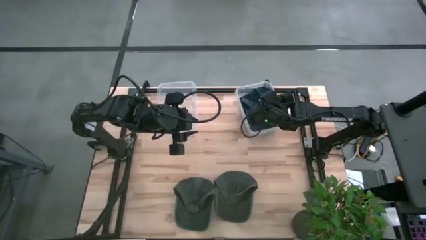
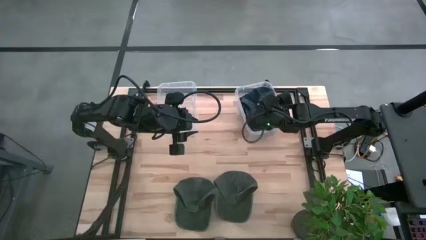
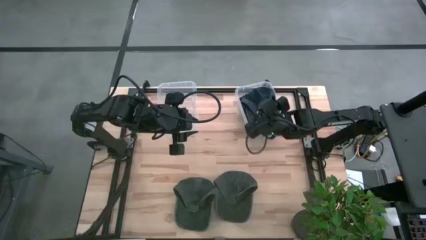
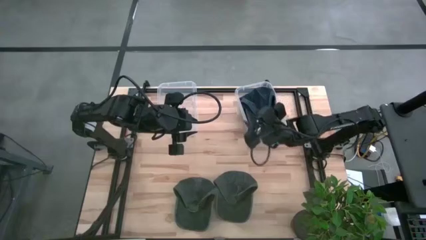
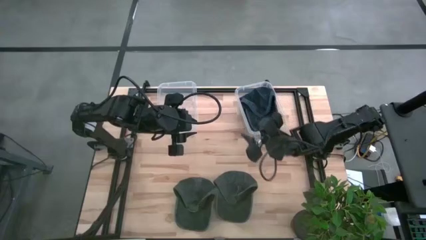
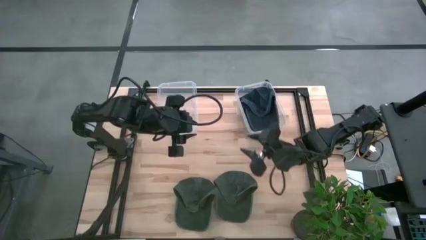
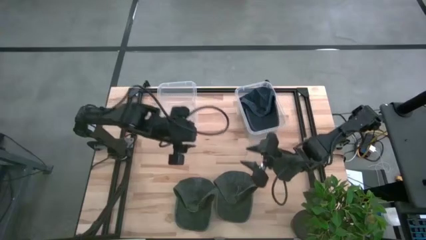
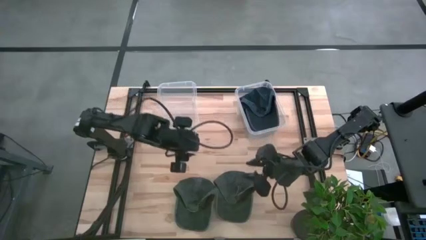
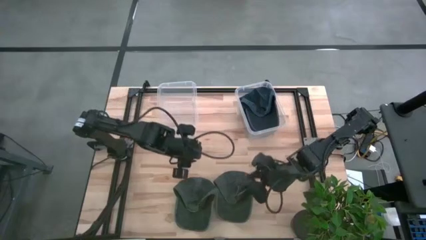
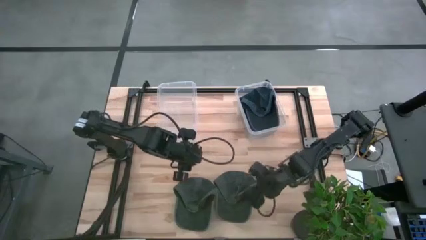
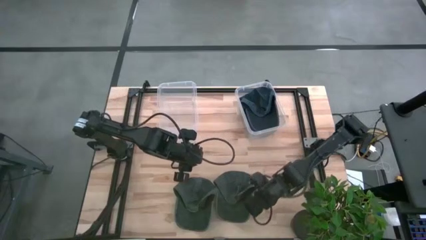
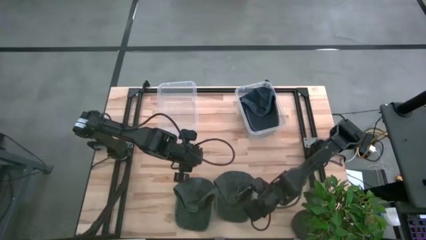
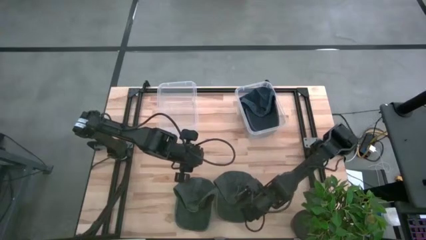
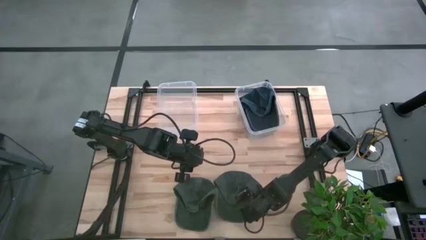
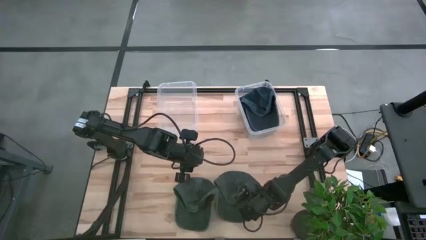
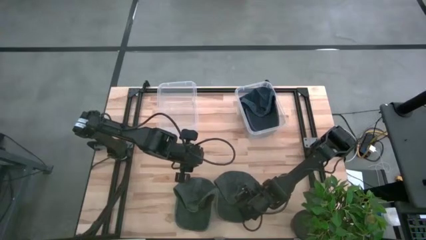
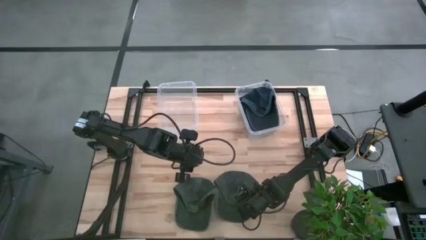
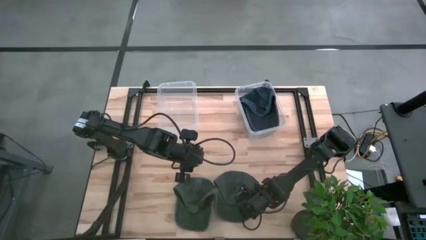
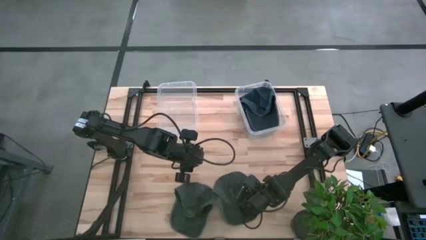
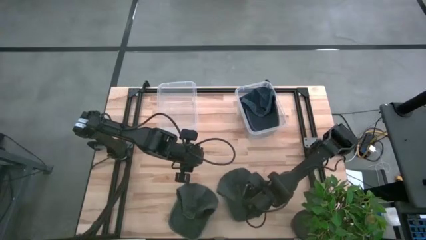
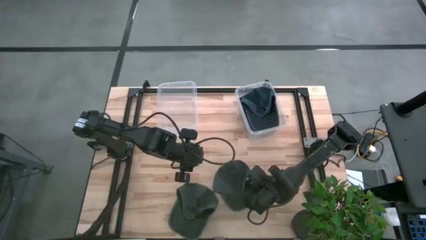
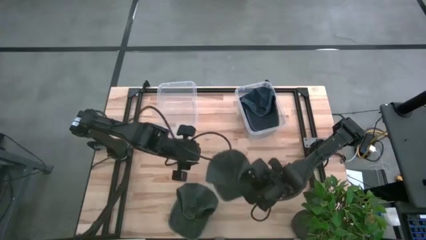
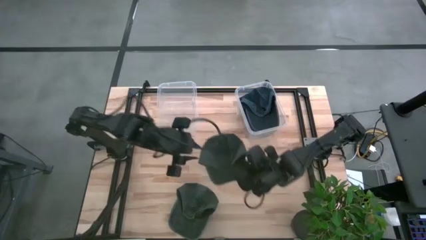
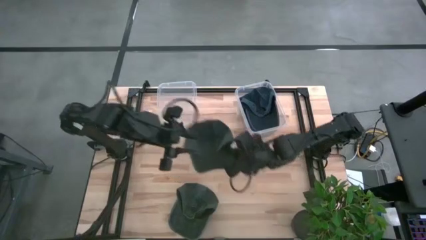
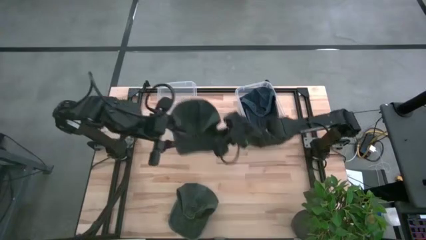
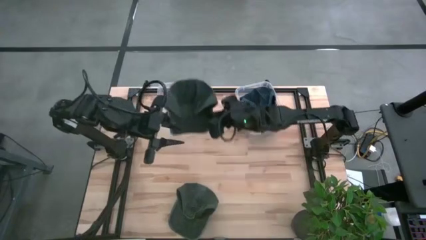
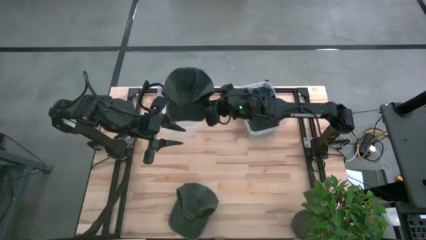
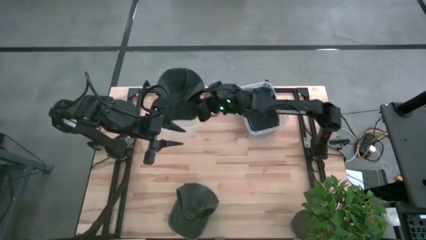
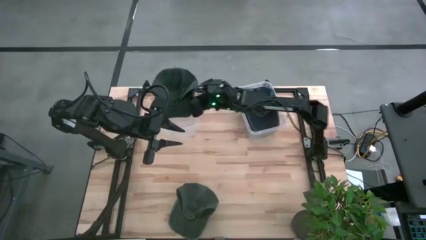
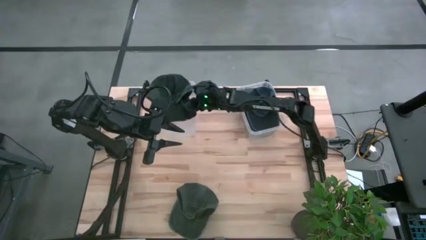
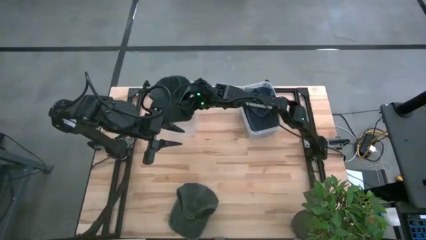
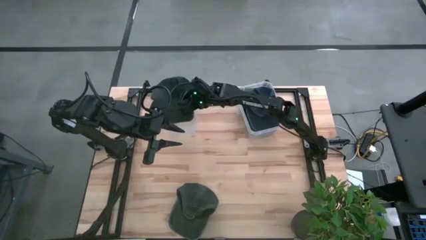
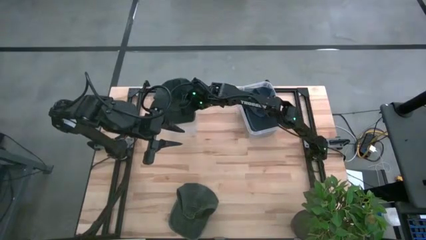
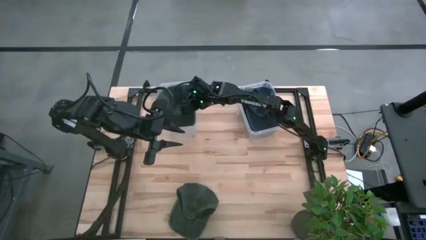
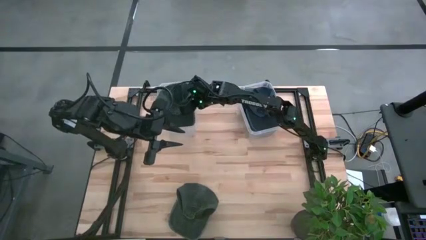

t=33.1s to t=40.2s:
Task: Pick & Place hat
Put the right green cap into the left transparent bin

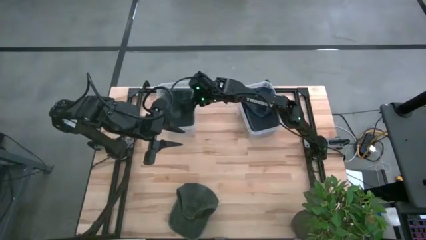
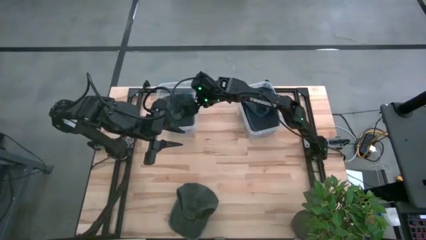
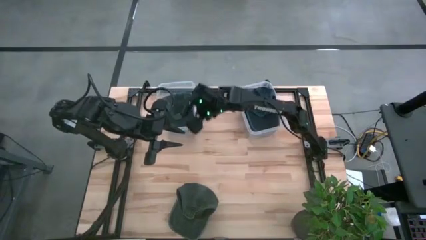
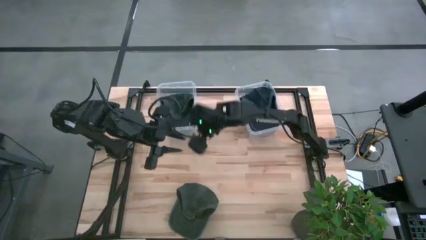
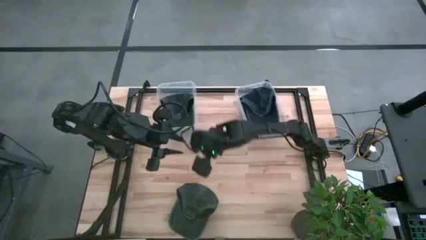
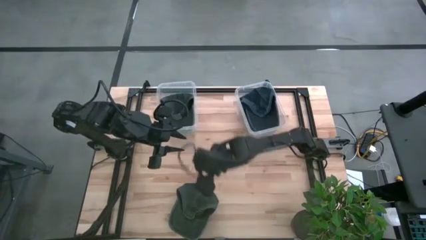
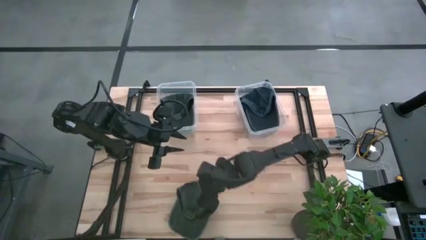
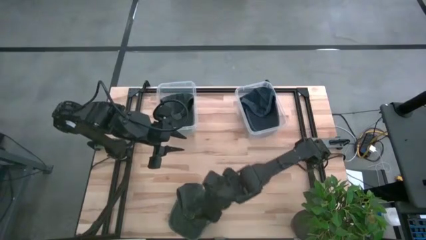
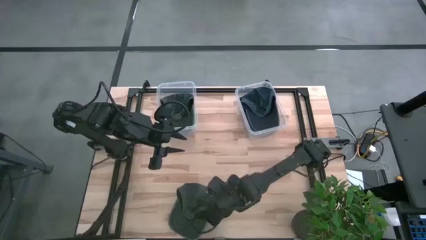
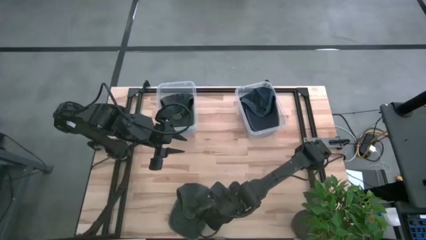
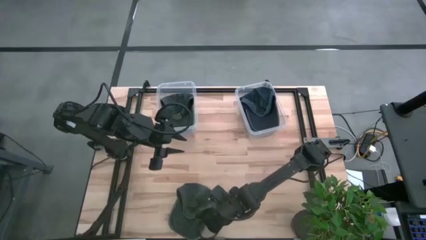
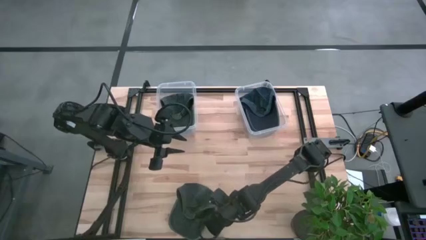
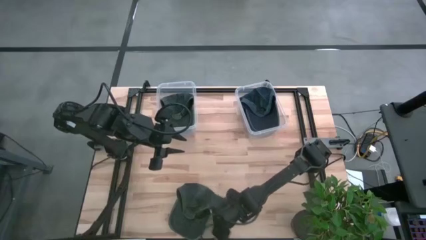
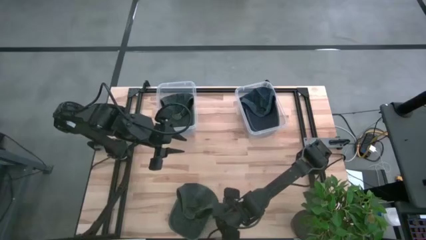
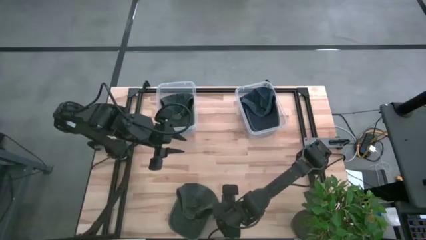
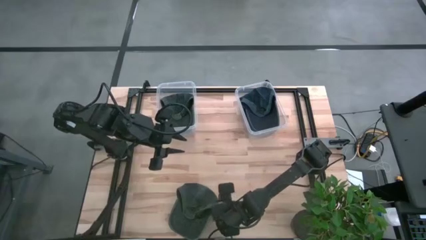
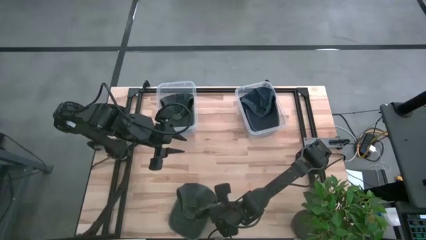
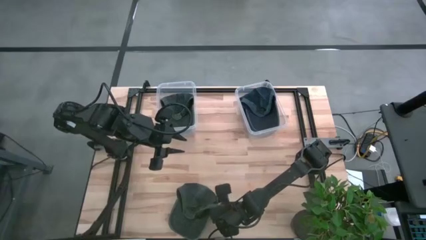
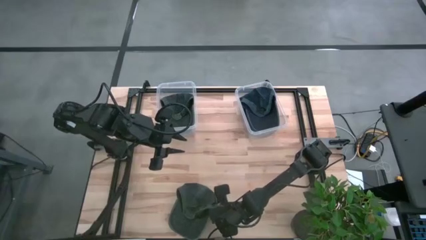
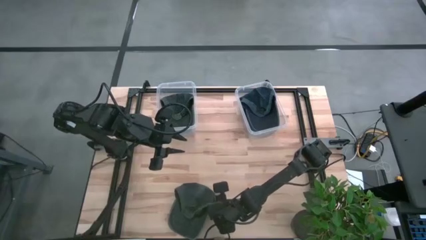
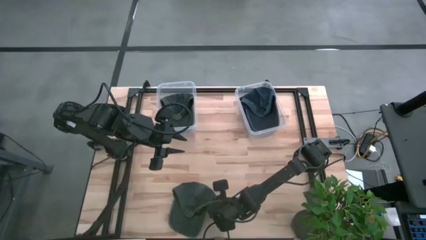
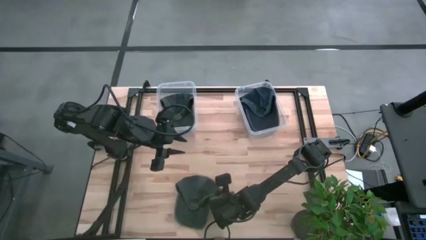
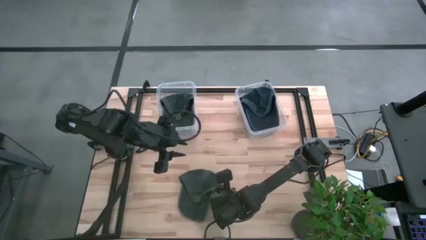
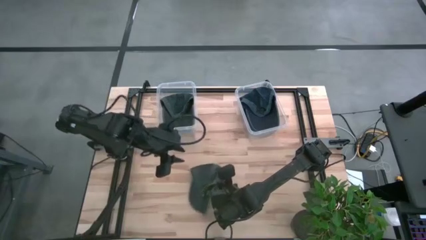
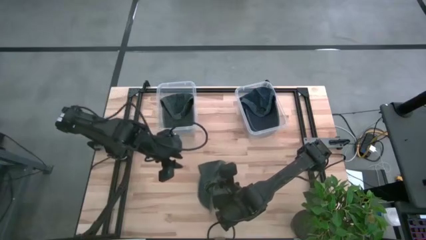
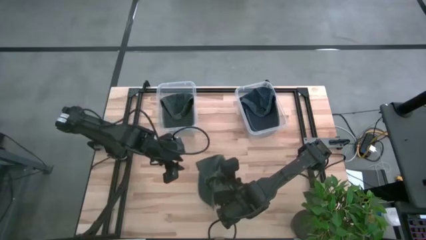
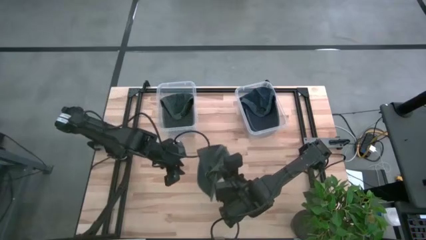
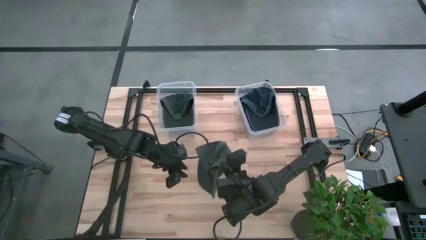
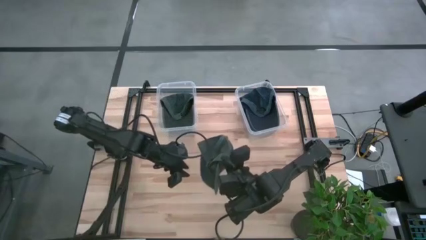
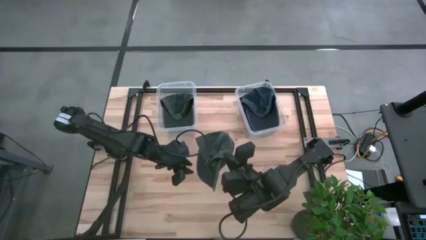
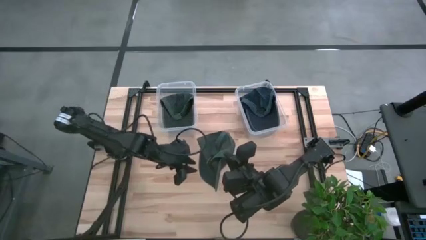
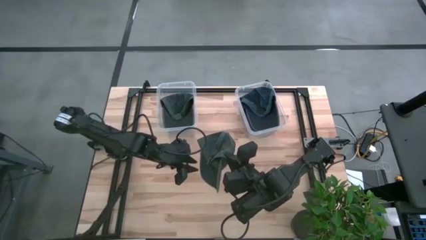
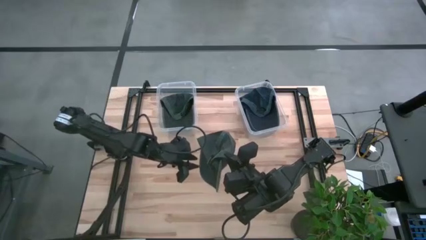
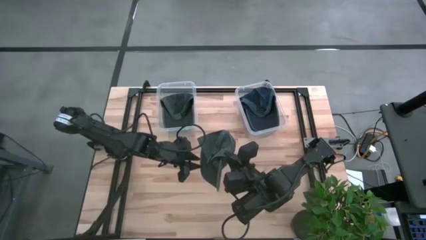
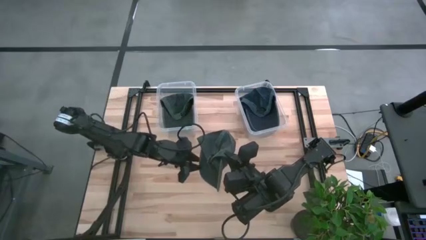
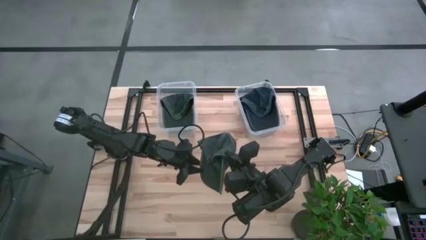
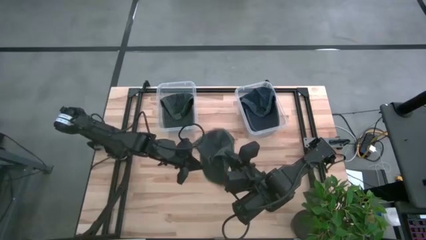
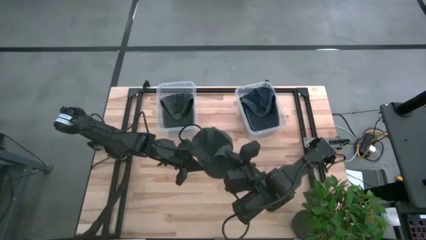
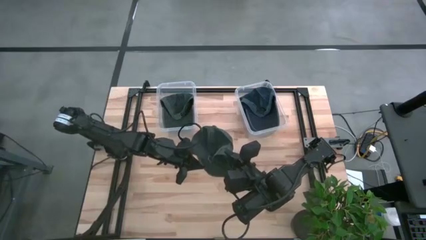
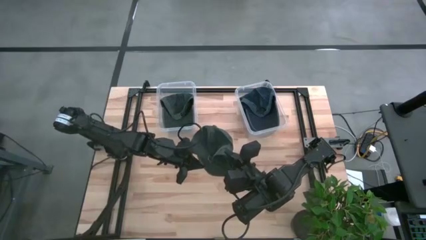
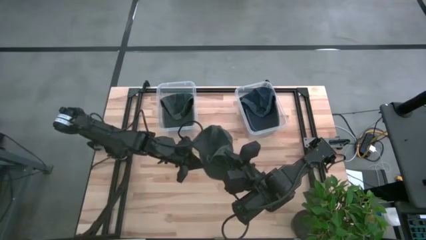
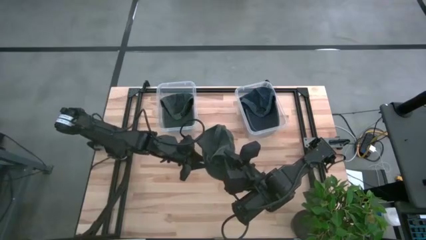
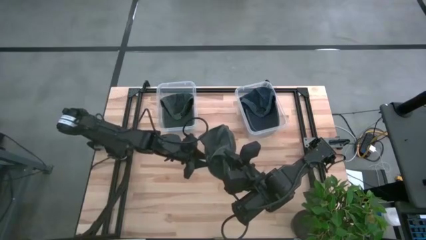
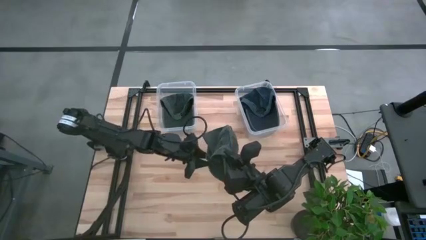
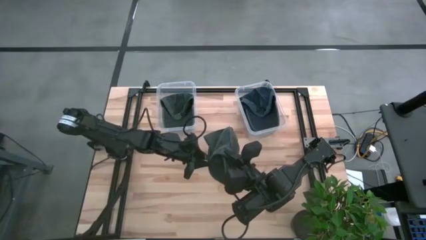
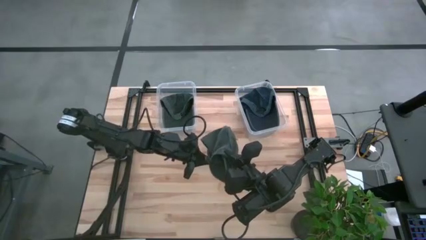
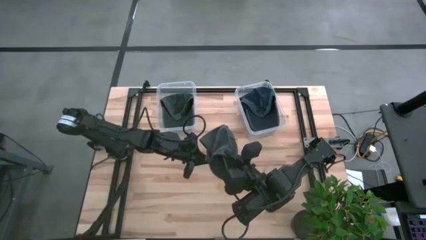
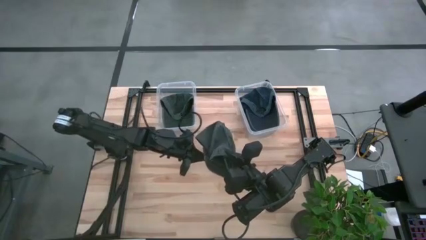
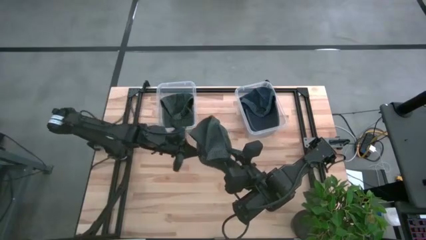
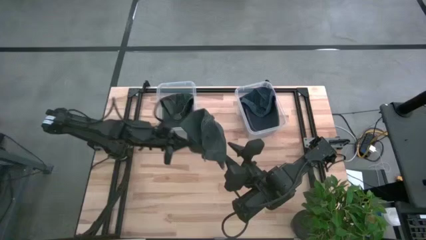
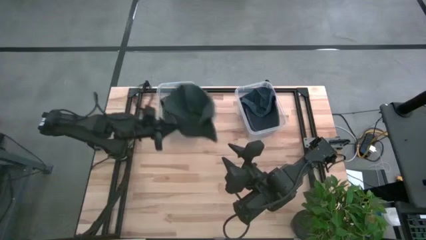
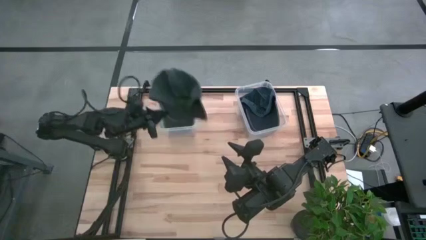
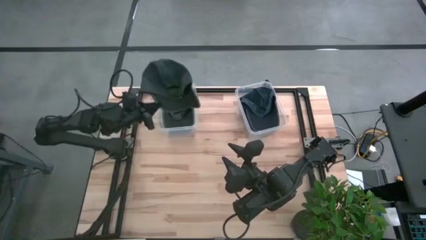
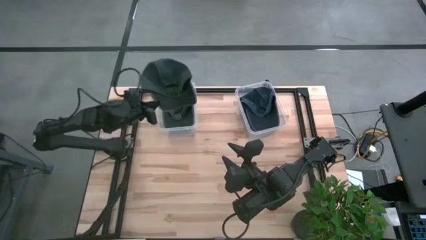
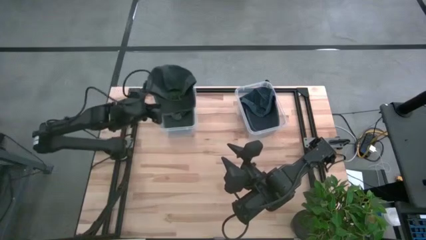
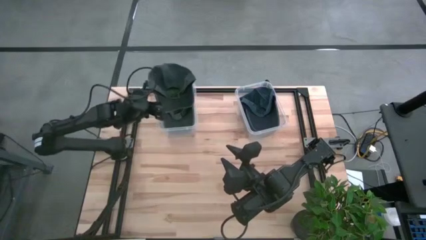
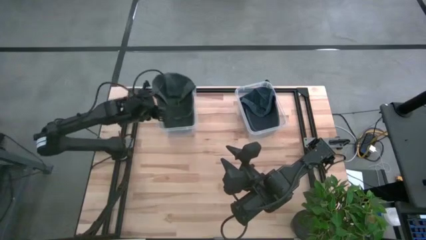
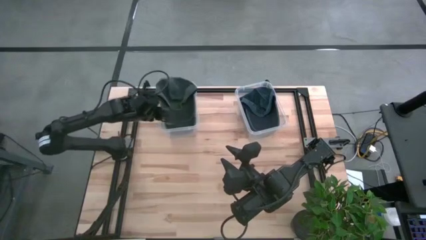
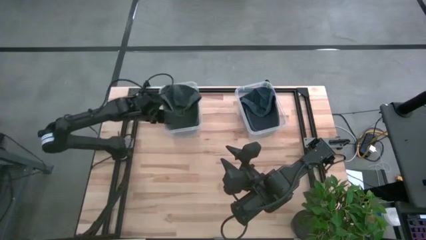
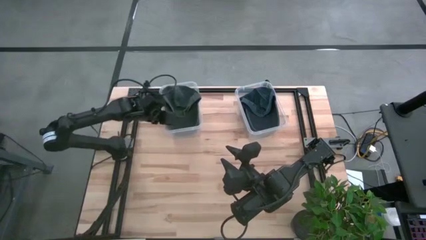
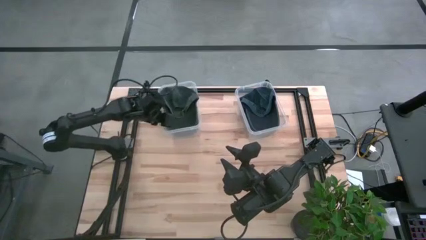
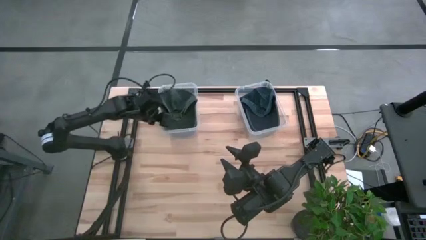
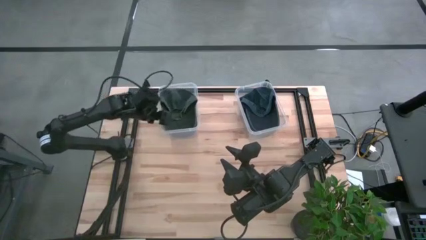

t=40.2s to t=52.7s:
Put the green cap into the left transparent bin
